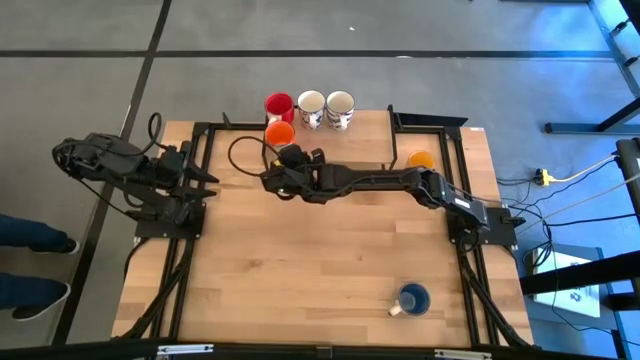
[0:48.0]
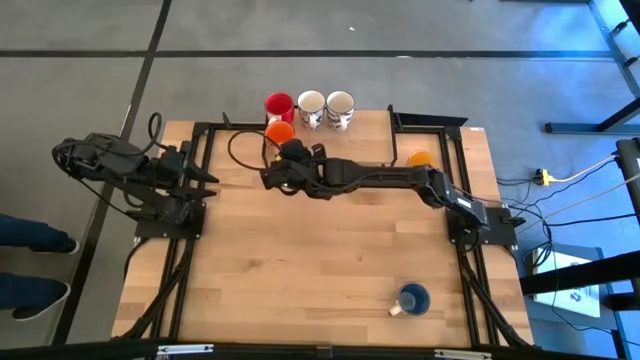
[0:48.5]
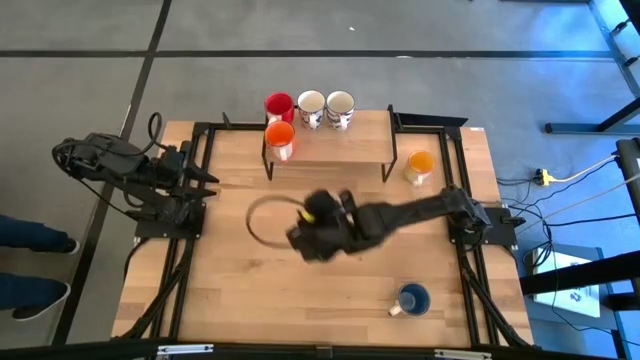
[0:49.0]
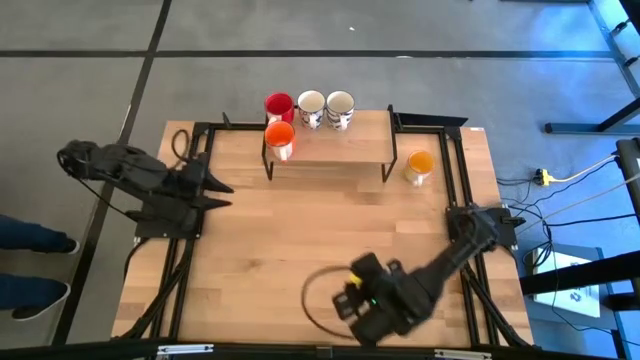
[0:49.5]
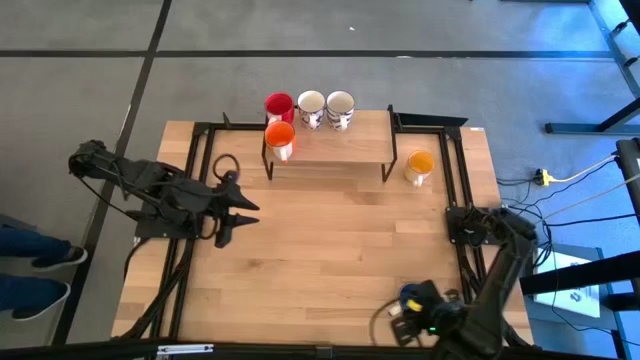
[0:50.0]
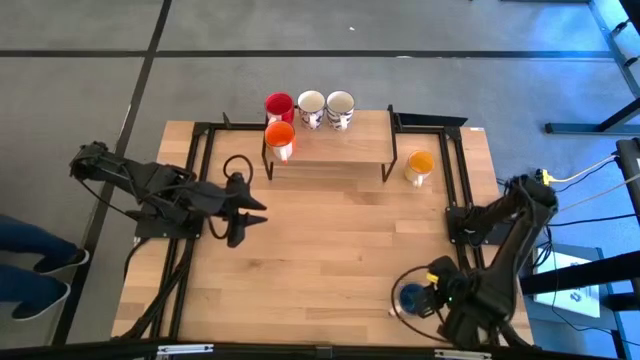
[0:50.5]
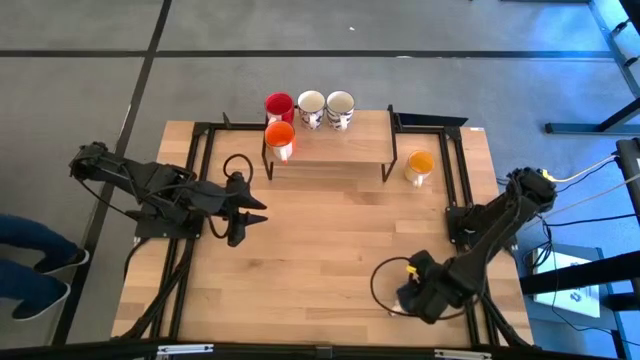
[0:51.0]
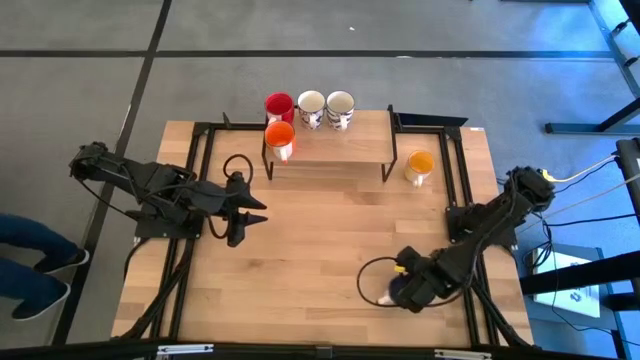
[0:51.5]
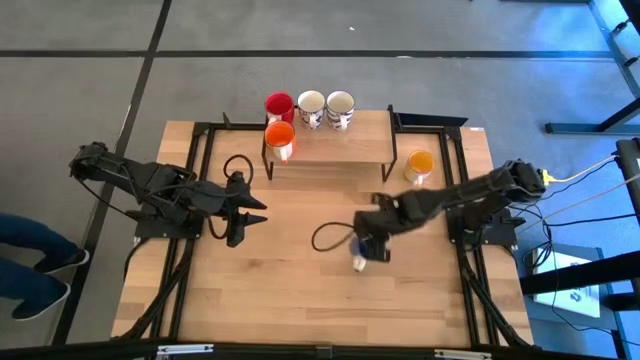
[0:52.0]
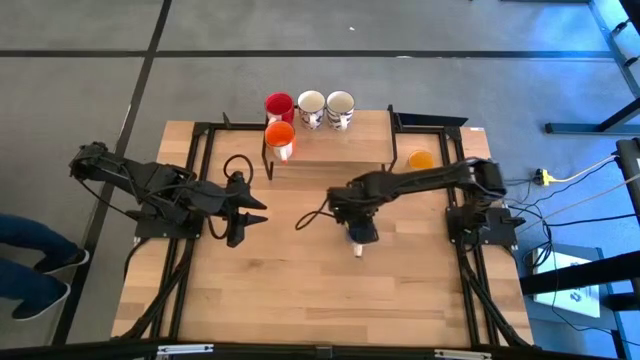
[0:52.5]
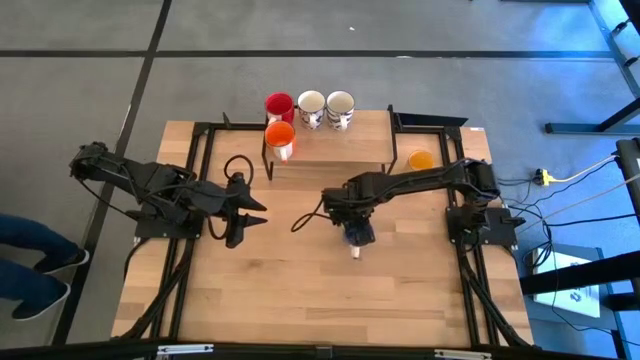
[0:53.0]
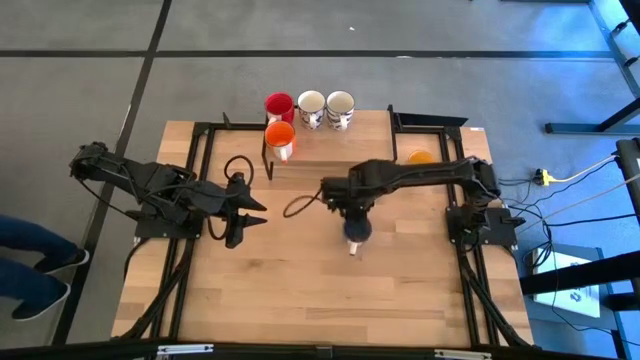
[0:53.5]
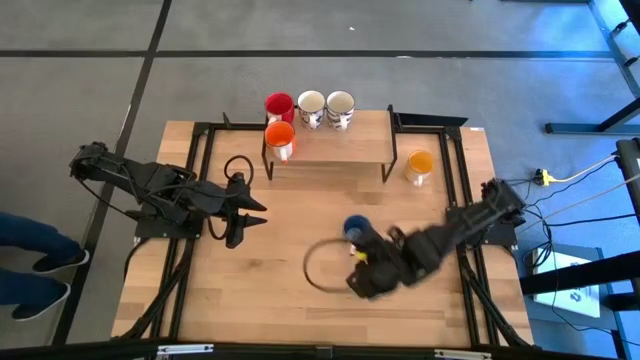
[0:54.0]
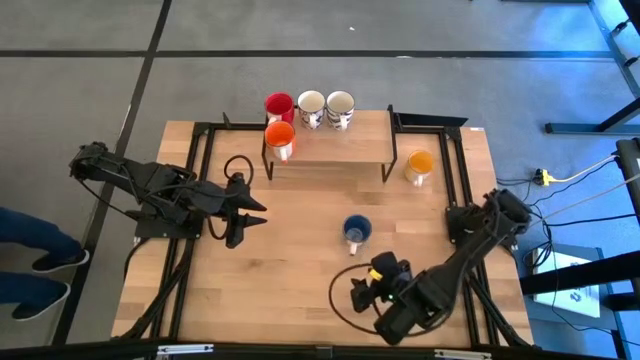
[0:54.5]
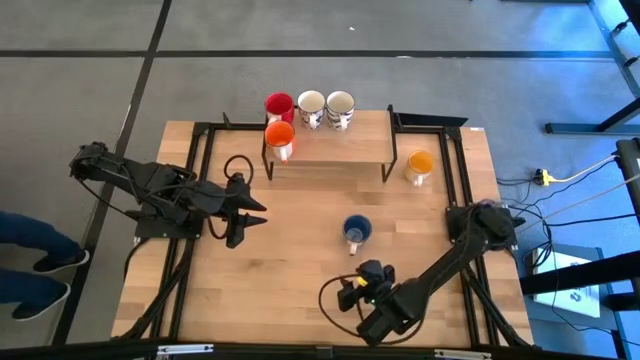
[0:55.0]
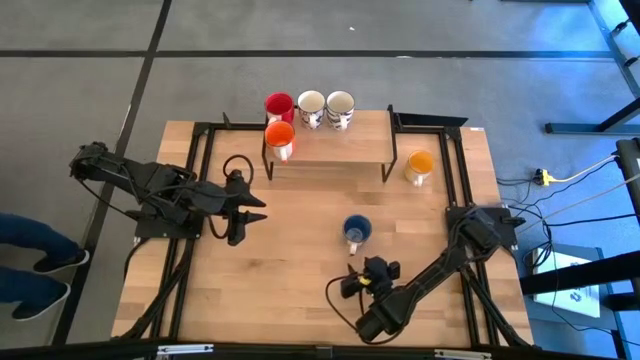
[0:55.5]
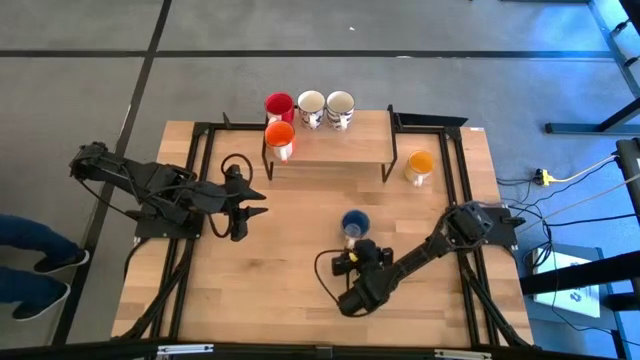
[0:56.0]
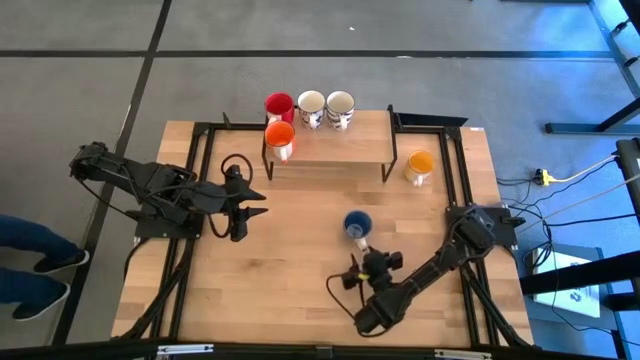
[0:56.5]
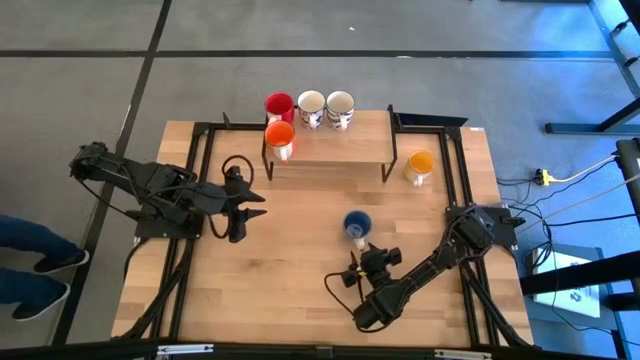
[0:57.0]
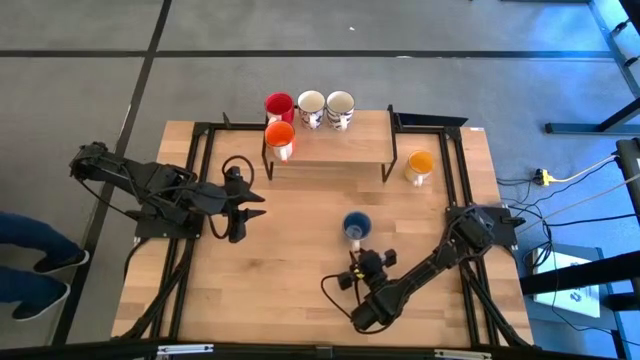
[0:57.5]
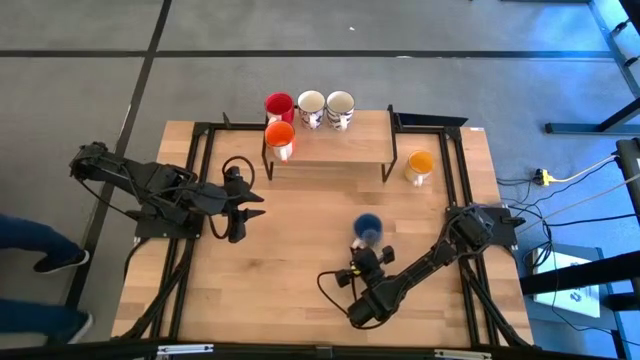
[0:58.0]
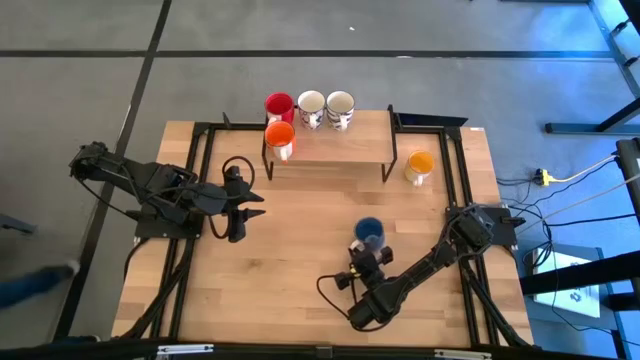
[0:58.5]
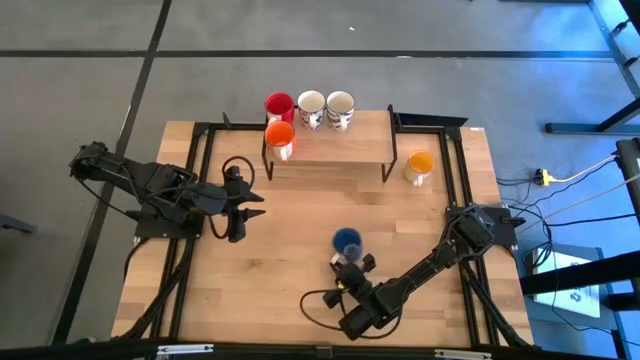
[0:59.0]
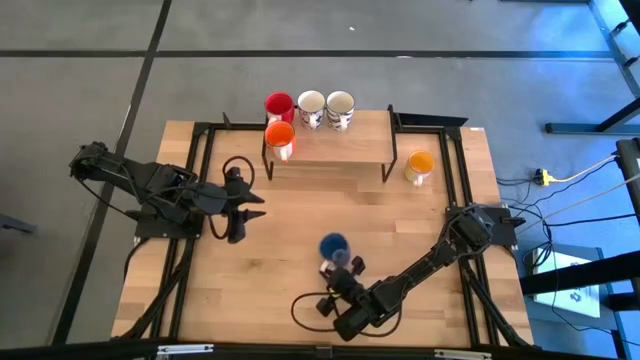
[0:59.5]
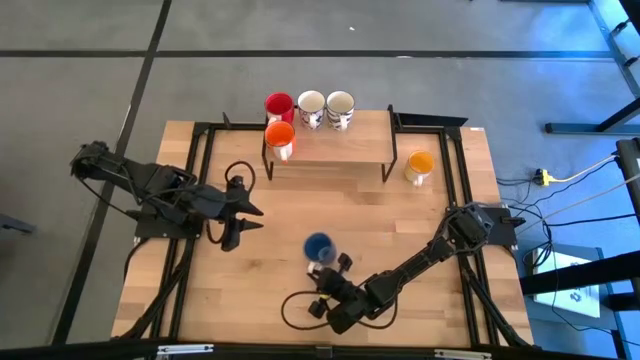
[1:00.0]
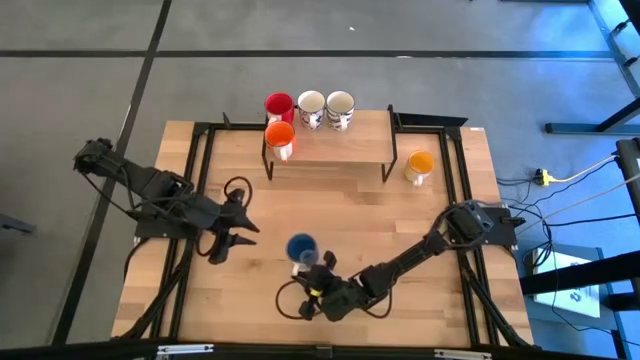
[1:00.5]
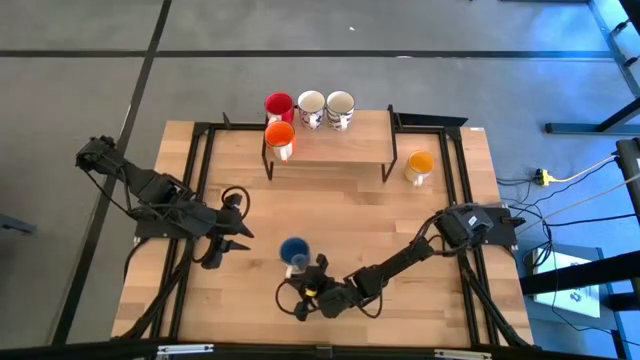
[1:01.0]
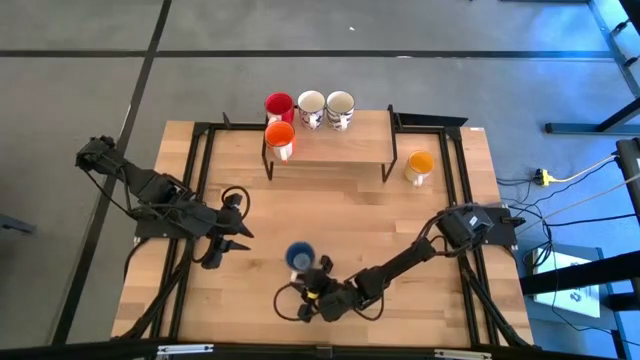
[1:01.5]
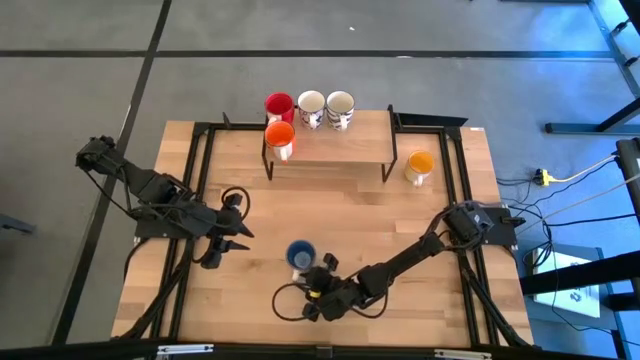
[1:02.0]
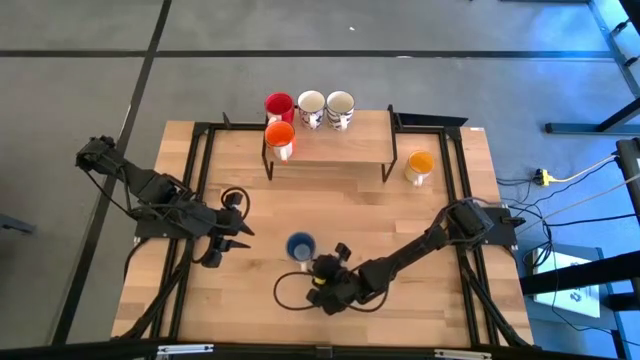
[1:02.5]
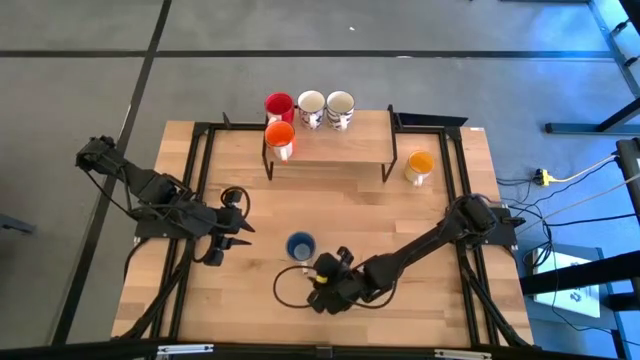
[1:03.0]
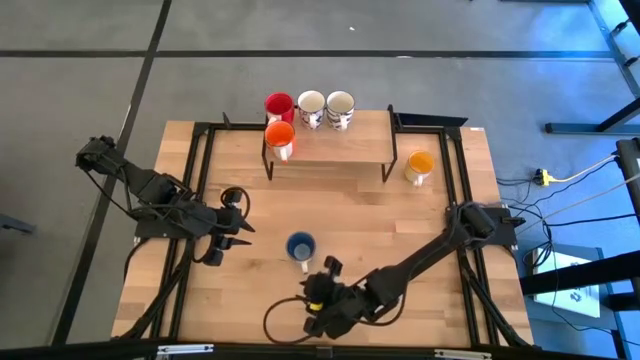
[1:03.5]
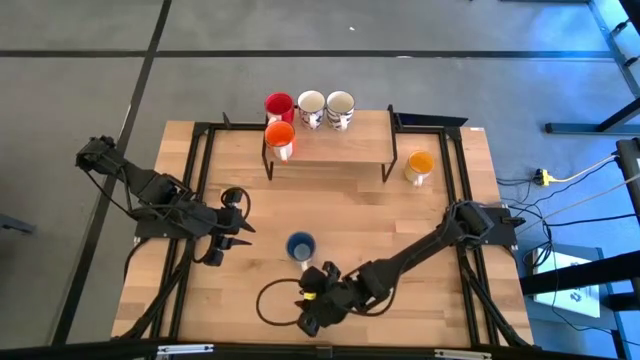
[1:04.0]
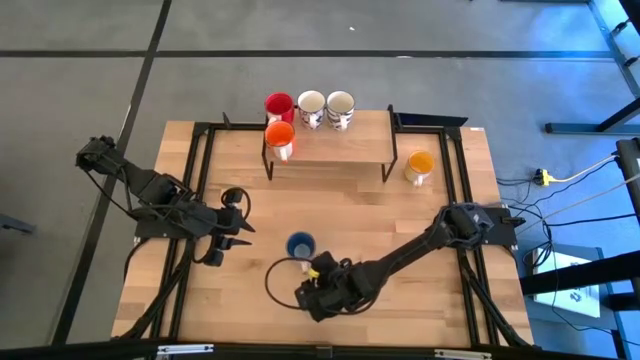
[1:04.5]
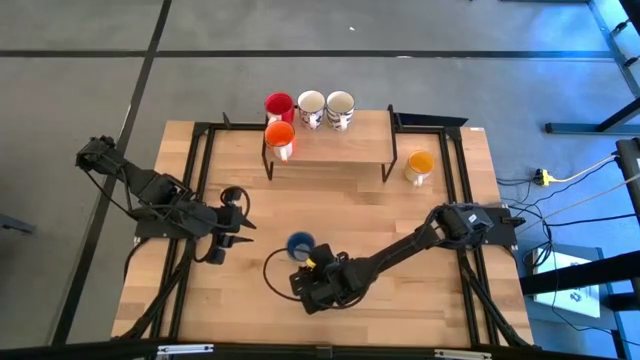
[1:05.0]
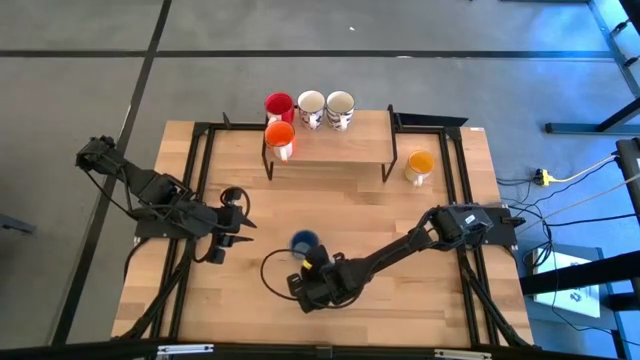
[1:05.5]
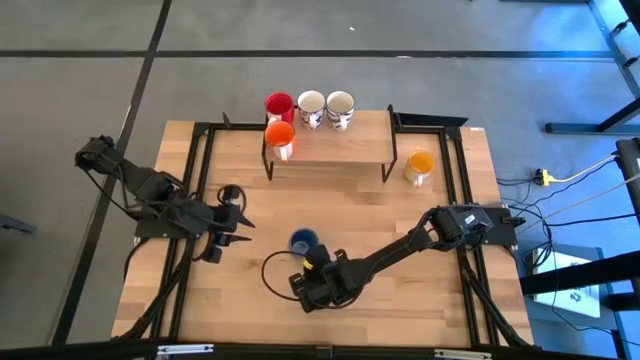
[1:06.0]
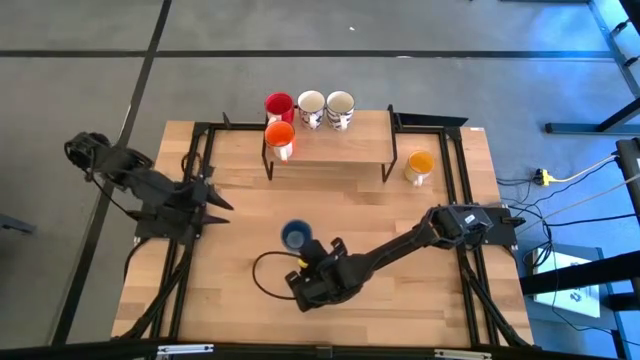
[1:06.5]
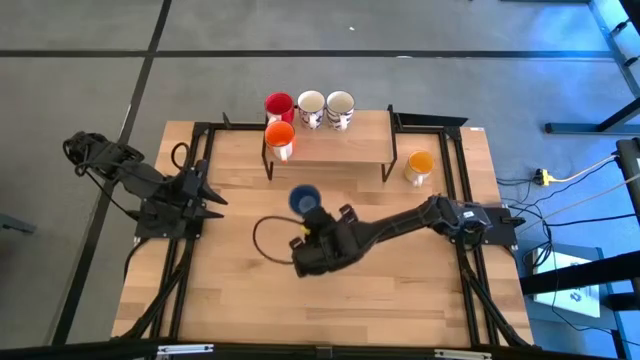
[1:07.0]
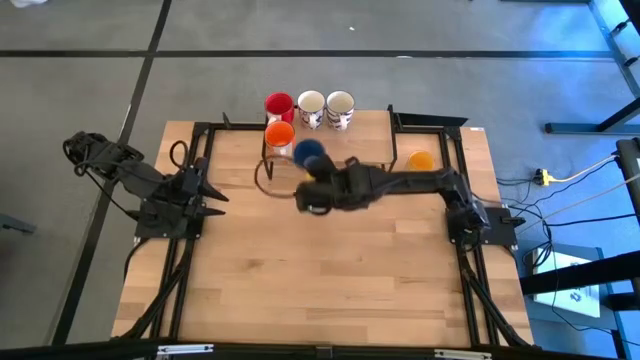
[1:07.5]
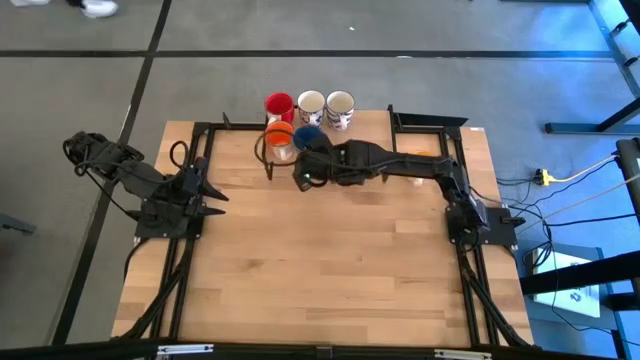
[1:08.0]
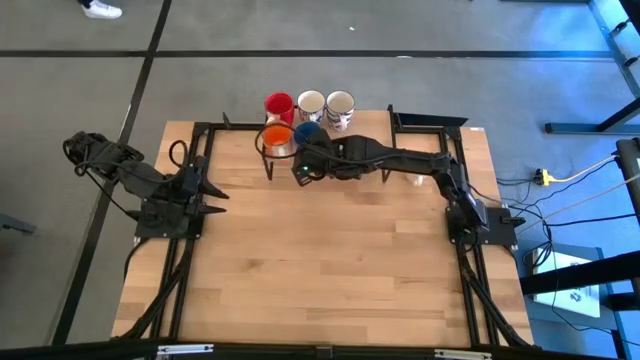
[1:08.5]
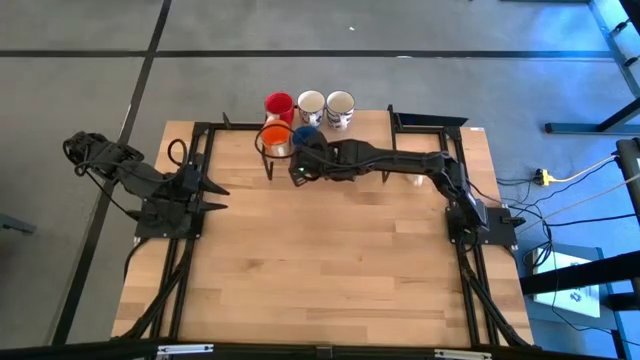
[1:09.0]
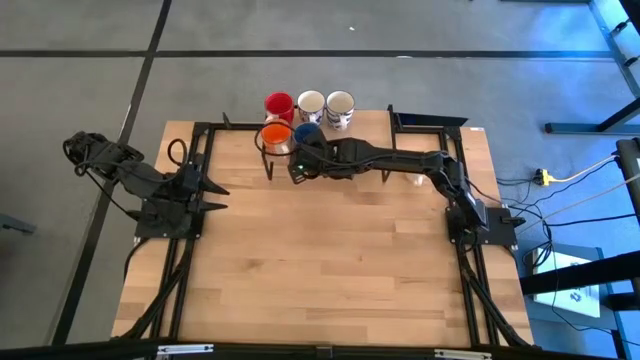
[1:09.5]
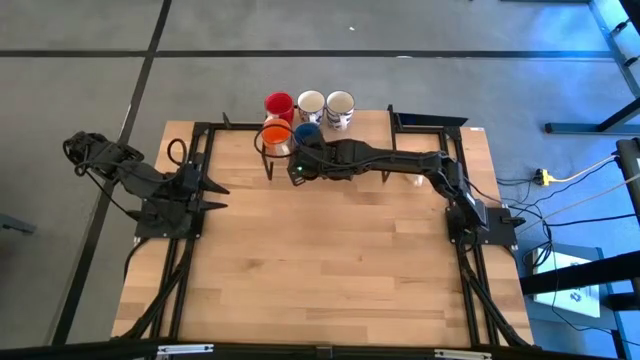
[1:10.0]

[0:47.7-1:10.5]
Task: Place coffee mugs
Put the blue cup on the shelf
